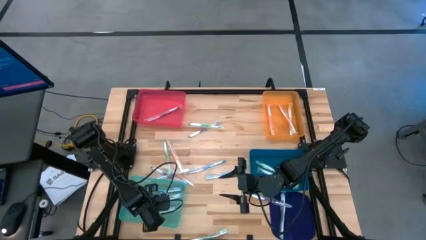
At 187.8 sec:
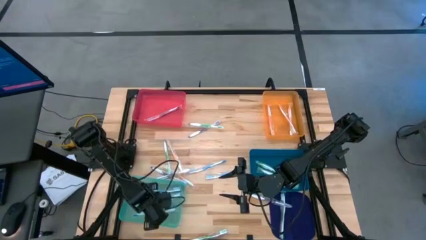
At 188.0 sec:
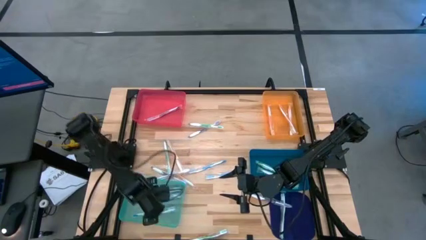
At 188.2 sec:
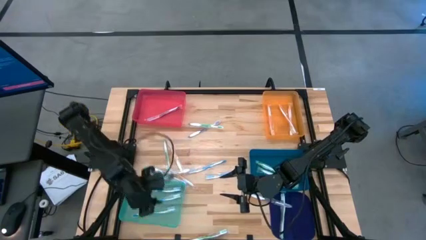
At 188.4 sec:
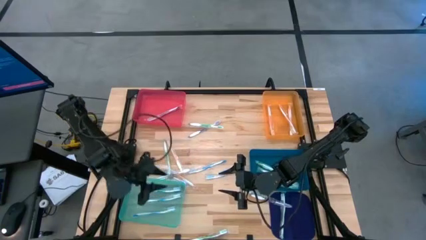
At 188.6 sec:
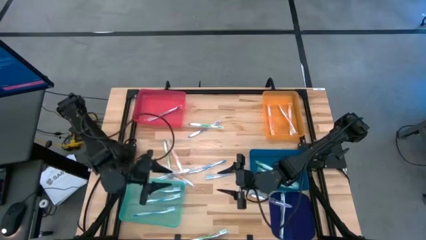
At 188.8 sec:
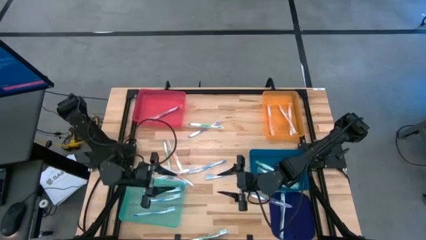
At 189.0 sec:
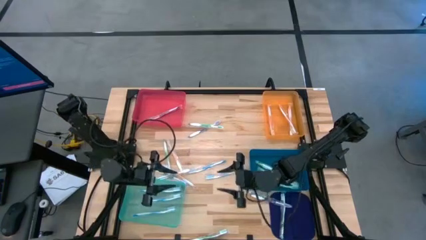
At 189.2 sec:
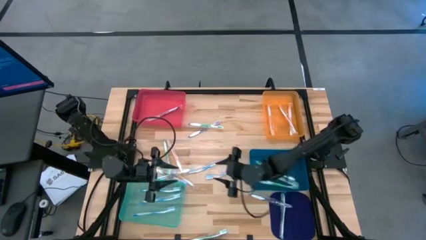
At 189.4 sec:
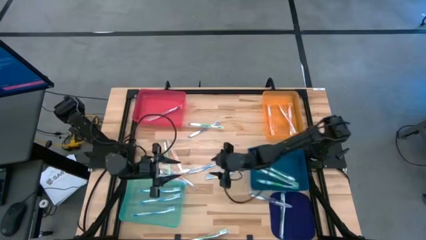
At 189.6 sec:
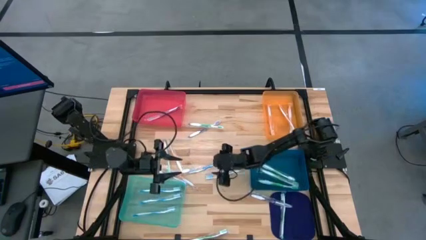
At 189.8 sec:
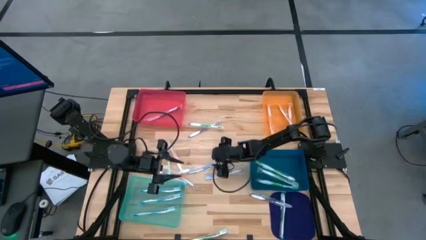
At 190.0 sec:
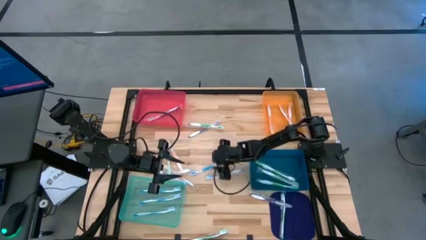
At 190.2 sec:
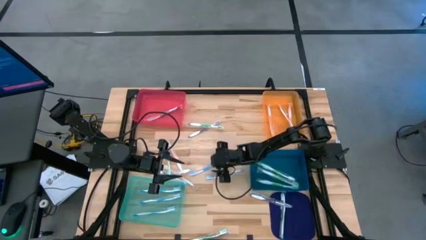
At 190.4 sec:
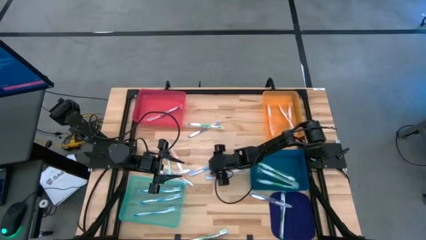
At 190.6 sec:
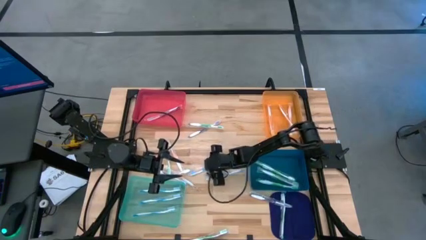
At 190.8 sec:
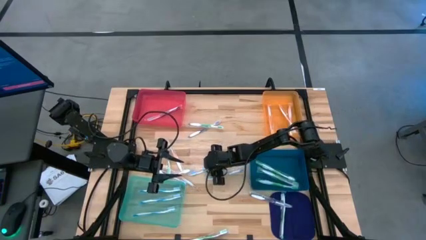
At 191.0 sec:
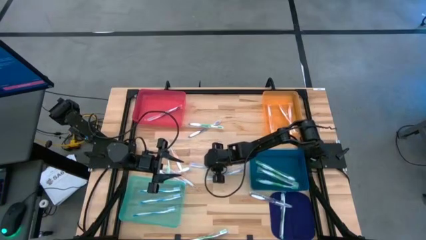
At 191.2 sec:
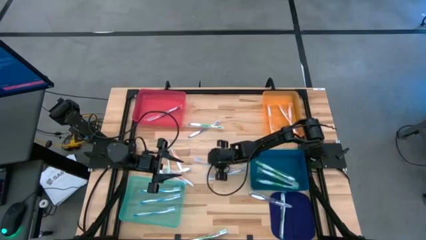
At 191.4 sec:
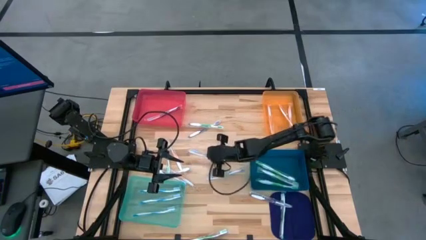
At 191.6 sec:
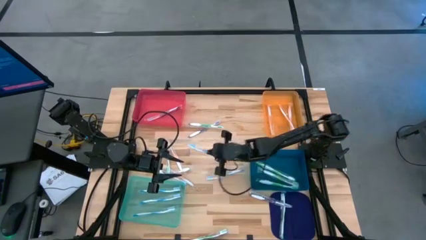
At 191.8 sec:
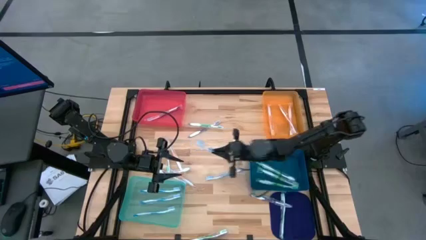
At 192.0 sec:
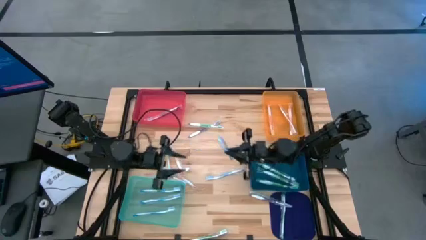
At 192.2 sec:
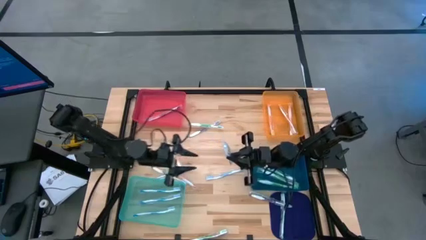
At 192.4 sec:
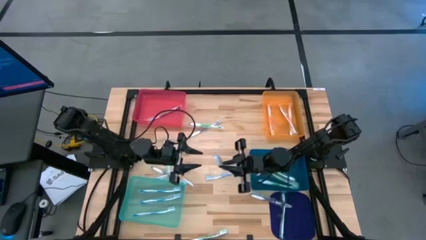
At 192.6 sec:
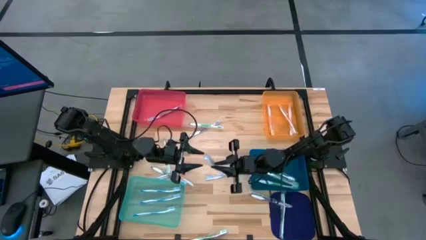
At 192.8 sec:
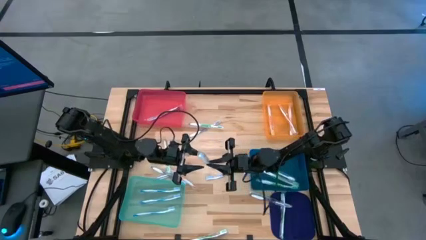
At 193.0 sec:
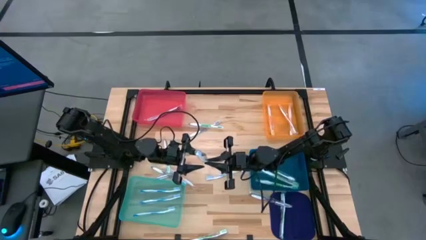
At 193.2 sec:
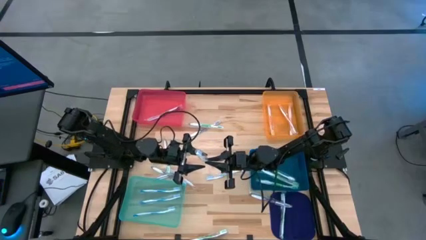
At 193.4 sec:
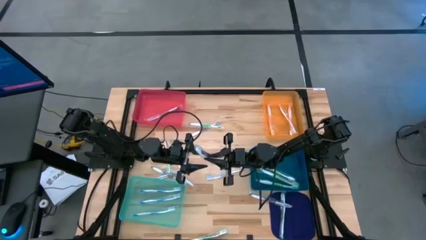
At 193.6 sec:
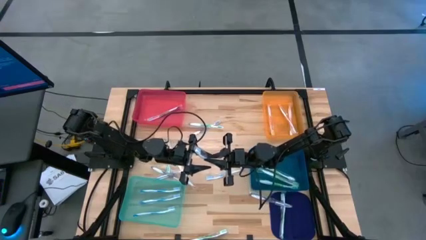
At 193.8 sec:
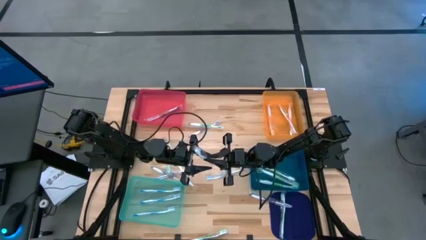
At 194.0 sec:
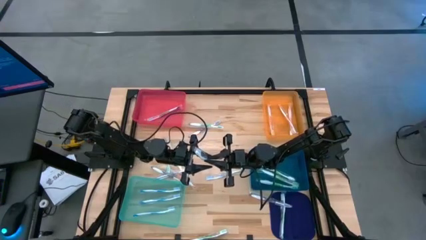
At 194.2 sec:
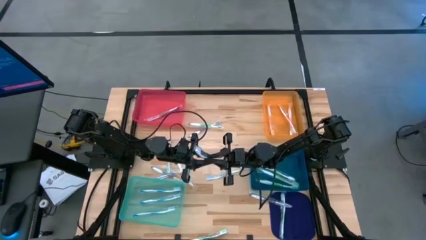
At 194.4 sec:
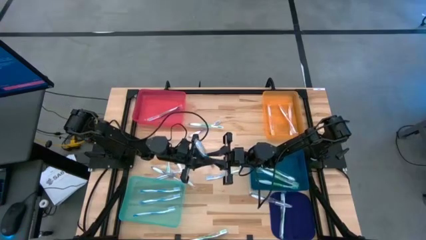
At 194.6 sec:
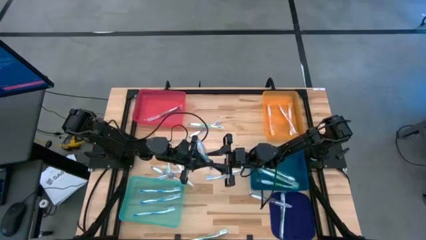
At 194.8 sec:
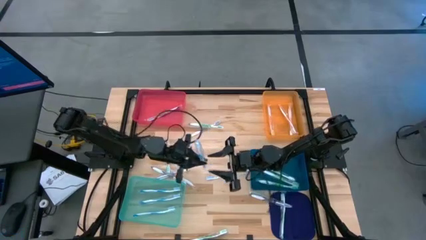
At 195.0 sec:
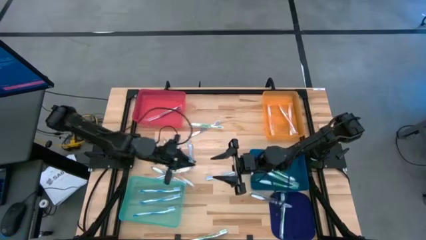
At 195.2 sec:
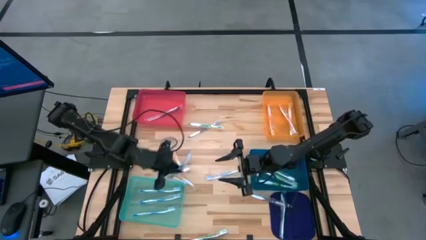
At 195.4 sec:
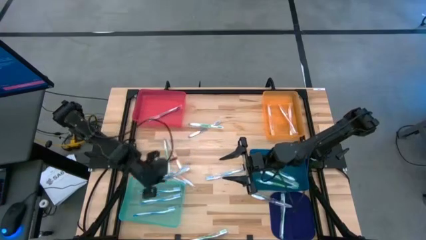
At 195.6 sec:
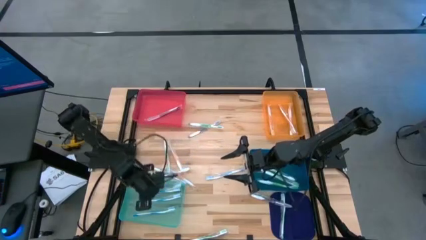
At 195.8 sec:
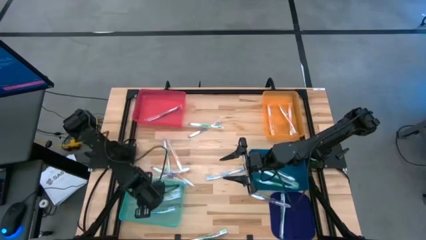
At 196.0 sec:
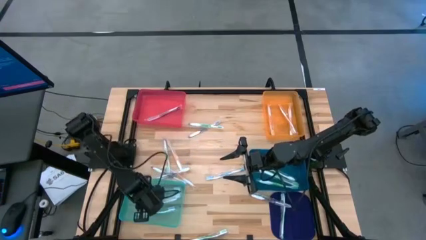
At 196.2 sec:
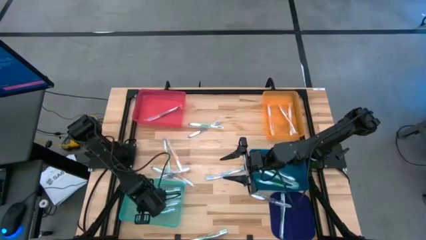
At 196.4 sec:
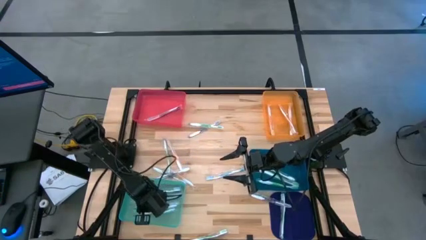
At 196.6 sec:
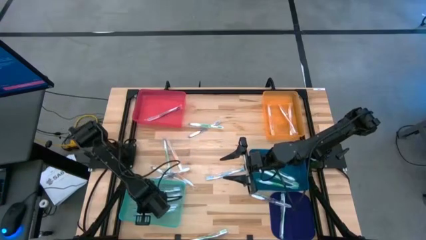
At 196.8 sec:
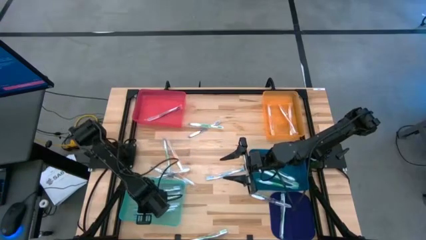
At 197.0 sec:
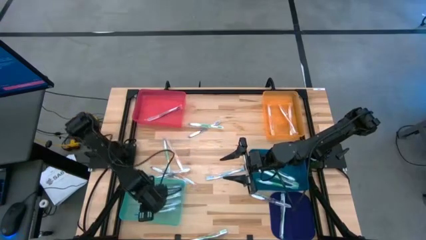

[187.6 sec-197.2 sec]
Task: Pick & Place Toothbrushes
Put the blue toothbrush into the green bin

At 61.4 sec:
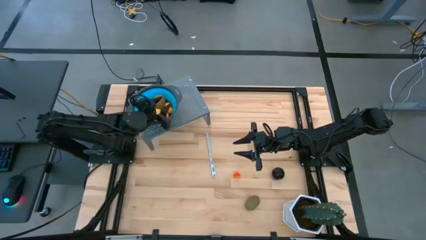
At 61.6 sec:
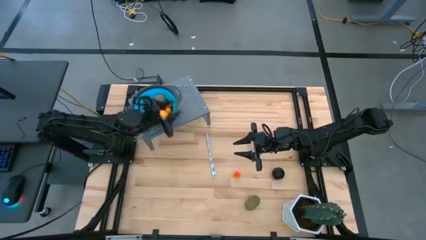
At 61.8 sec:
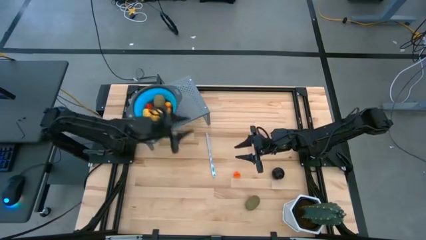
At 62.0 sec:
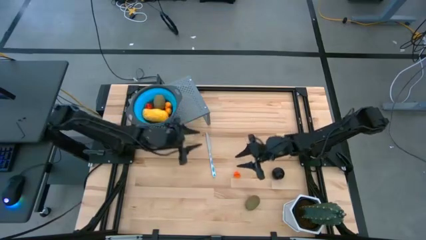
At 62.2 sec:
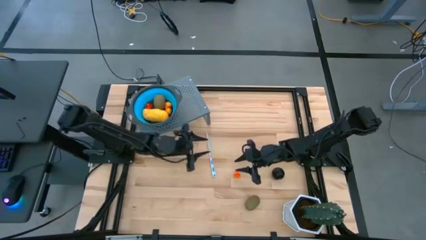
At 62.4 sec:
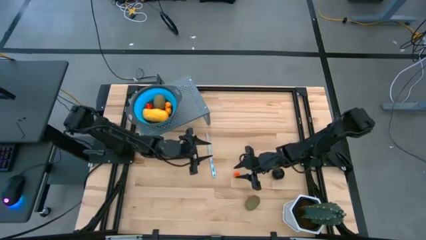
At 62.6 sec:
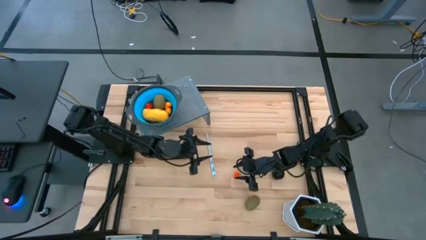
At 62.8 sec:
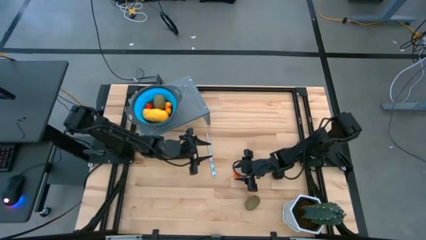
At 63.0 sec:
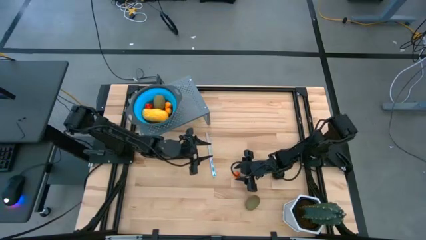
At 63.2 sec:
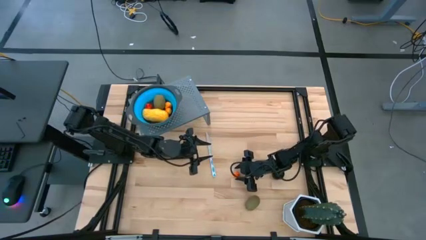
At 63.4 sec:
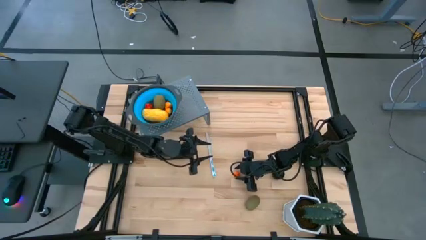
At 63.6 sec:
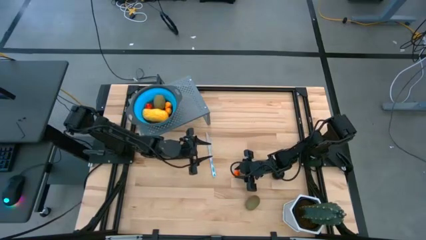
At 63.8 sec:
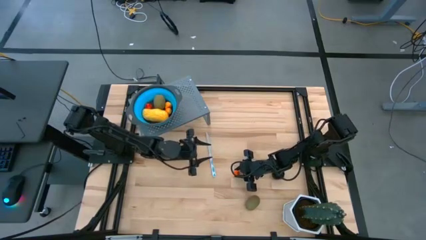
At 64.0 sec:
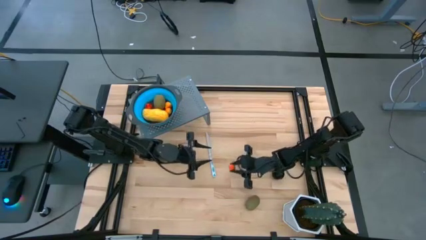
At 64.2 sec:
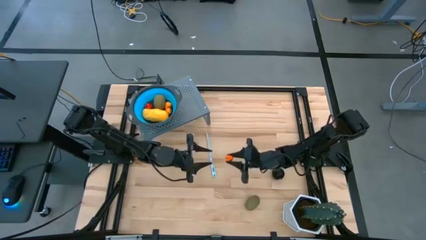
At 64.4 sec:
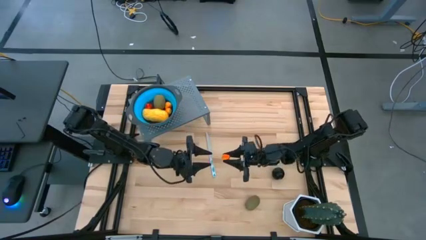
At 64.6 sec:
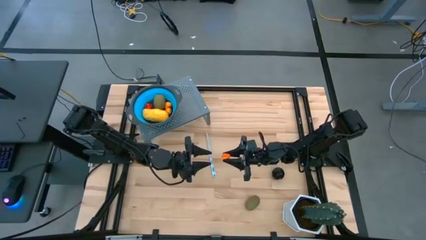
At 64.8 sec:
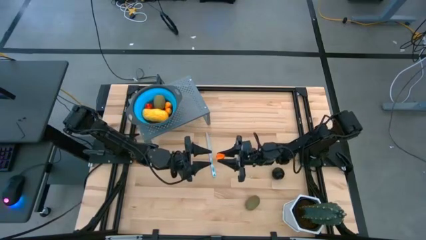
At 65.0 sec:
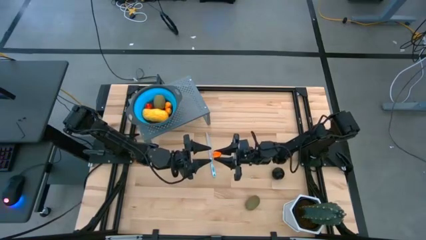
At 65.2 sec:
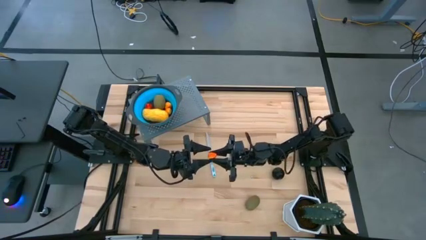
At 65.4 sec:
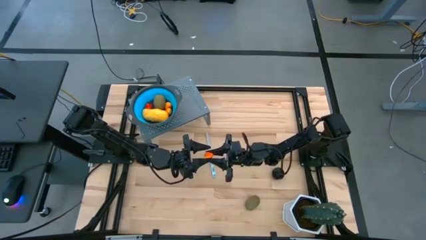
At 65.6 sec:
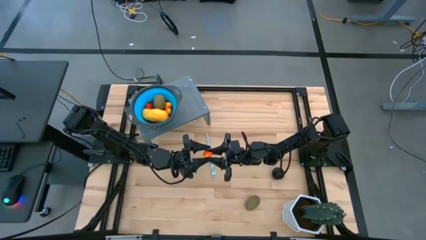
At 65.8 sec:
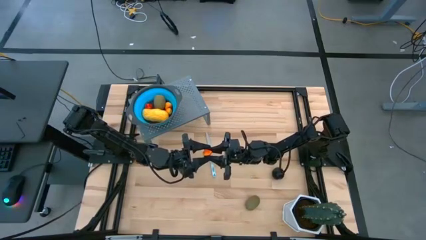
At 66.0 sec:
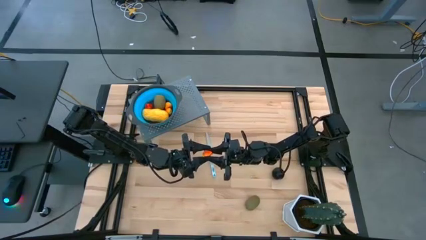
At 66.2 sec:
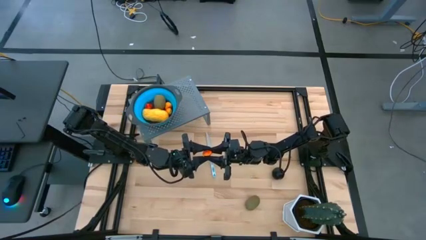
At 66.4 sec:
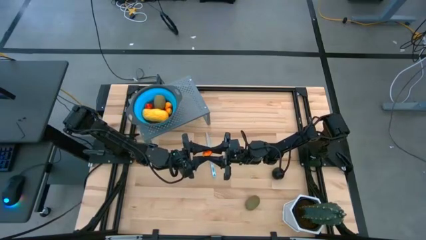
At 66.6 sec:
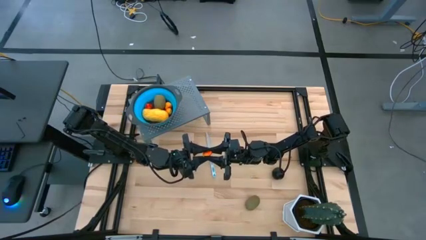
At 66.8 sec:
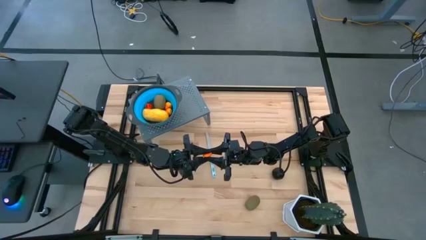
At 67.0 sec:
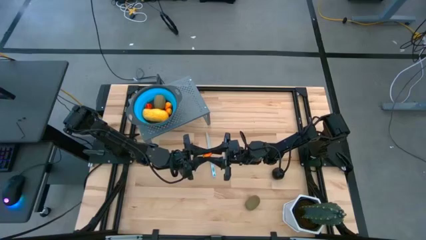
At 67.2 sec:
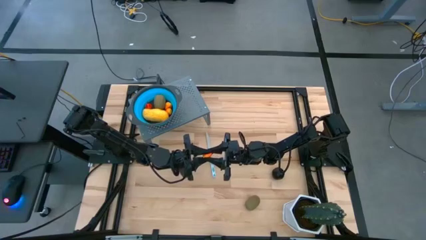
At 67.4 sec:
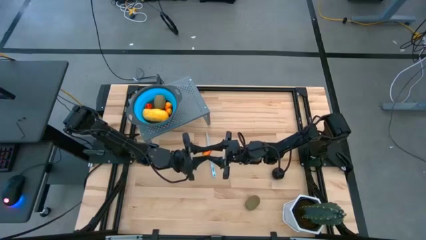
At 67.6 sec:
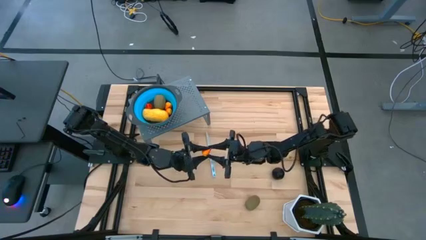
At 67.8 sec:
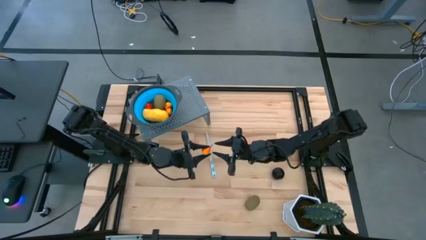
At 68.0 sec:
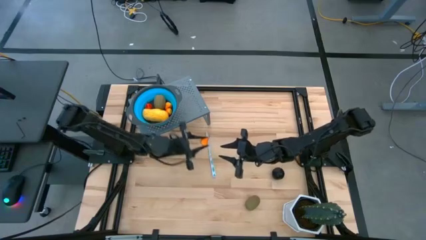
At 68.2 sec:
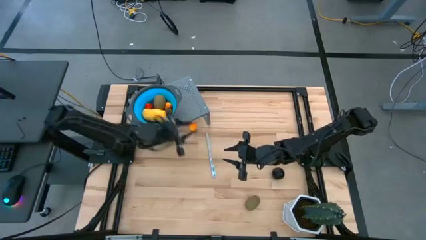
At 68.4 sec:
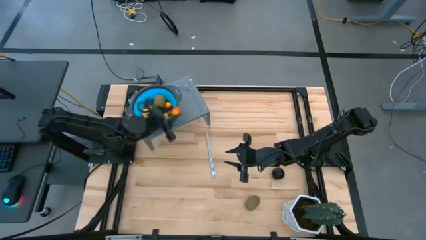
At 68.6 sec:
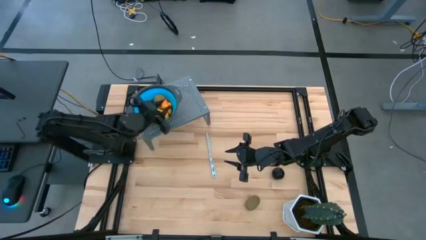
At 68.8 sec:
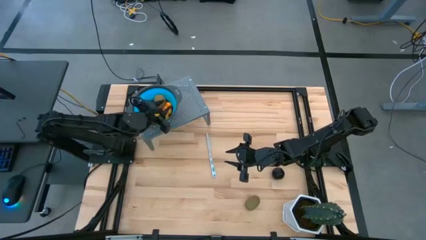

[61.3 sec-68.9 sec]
Task: Pick & Place Fruit
Put the orange peach into the blue strainer bowl on the shelf
